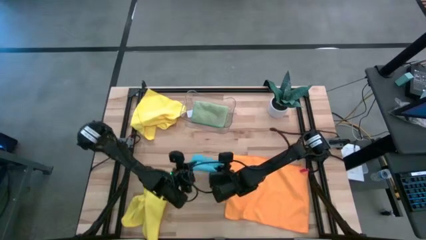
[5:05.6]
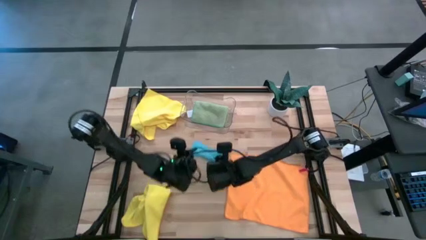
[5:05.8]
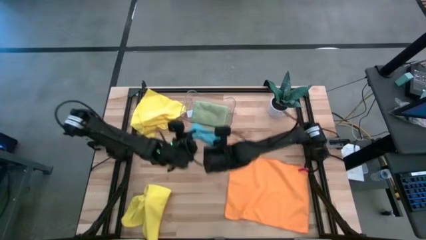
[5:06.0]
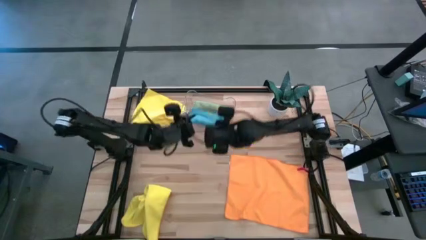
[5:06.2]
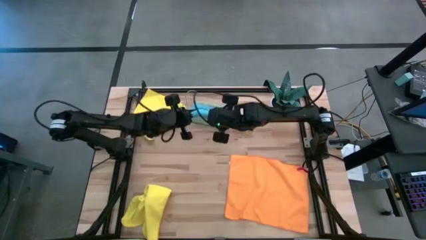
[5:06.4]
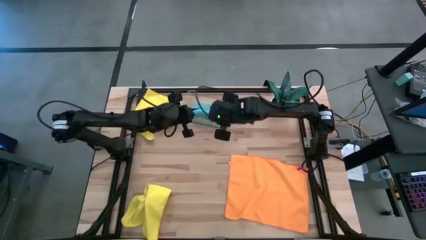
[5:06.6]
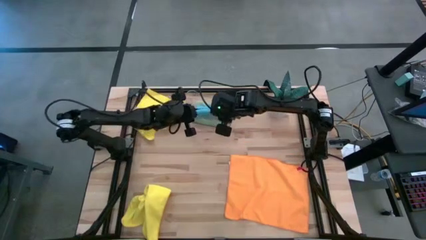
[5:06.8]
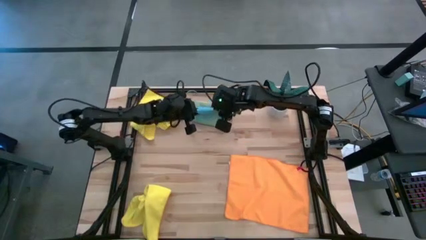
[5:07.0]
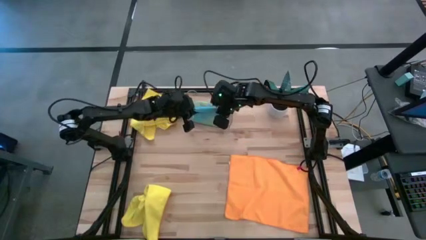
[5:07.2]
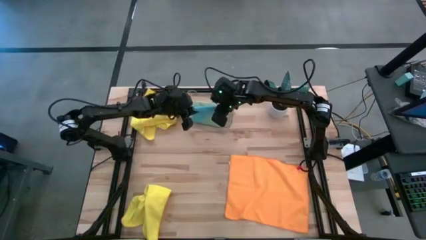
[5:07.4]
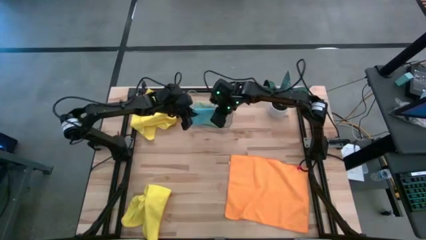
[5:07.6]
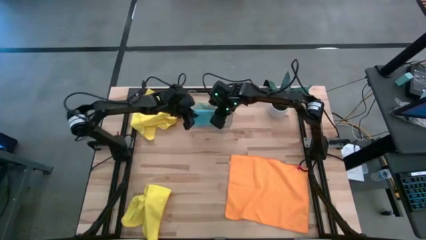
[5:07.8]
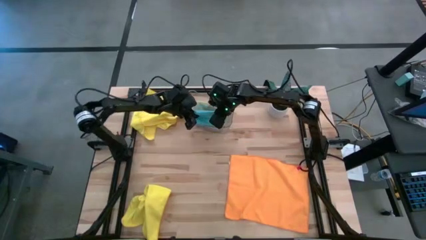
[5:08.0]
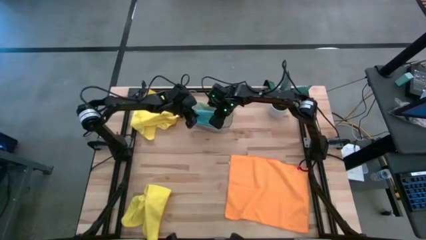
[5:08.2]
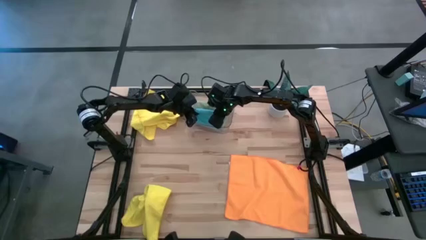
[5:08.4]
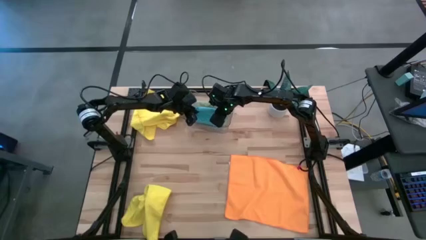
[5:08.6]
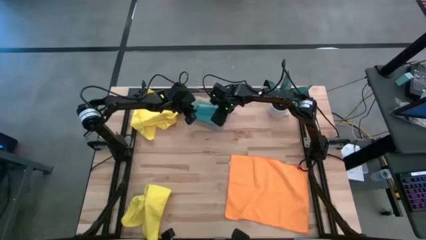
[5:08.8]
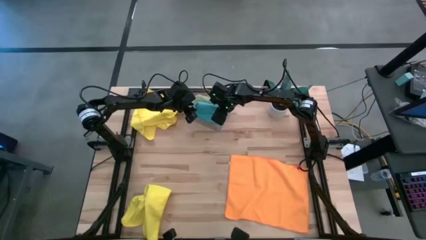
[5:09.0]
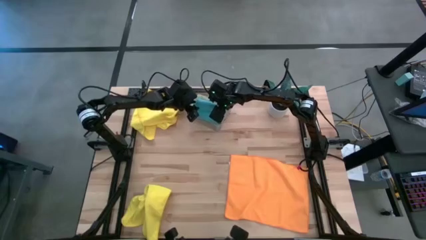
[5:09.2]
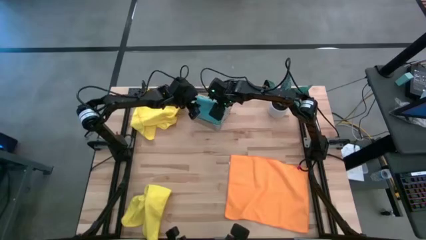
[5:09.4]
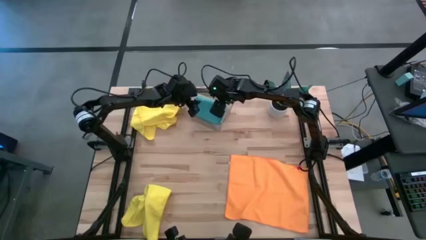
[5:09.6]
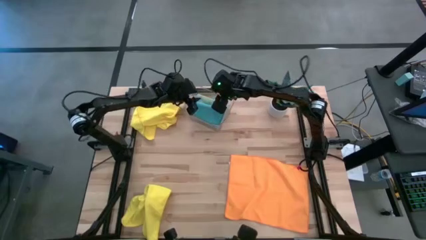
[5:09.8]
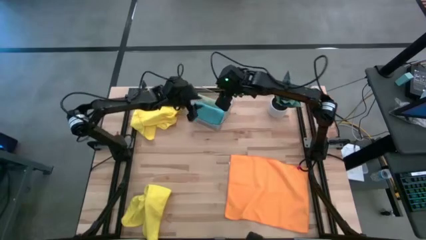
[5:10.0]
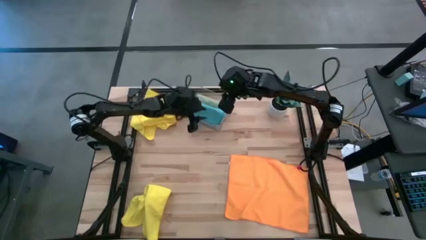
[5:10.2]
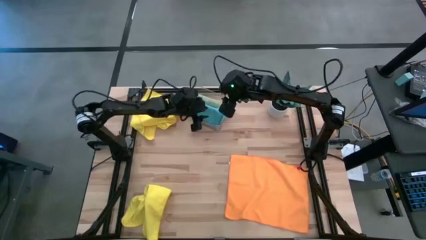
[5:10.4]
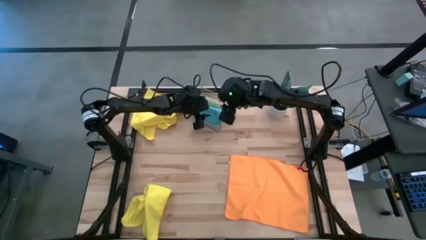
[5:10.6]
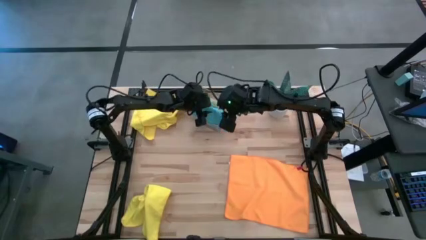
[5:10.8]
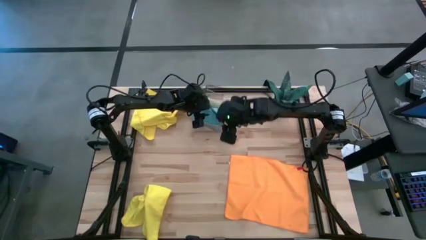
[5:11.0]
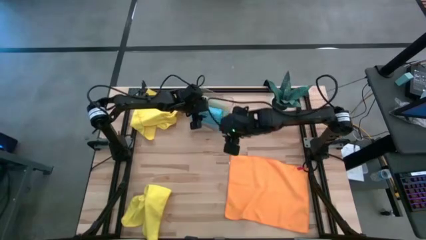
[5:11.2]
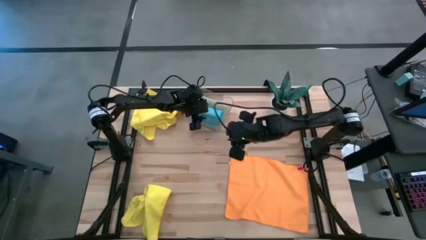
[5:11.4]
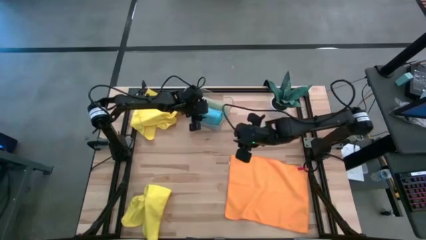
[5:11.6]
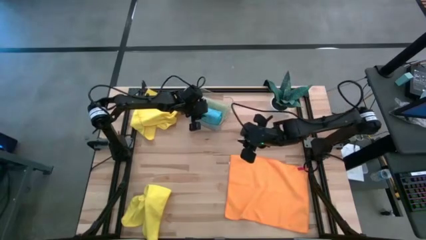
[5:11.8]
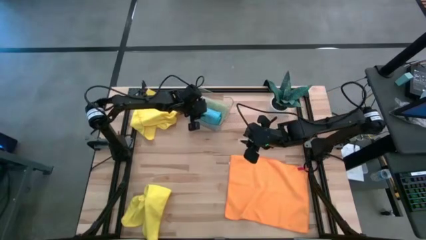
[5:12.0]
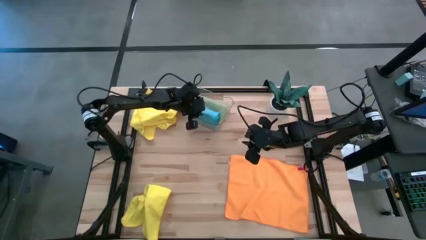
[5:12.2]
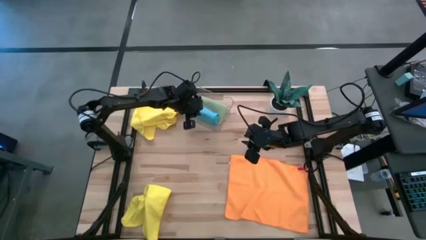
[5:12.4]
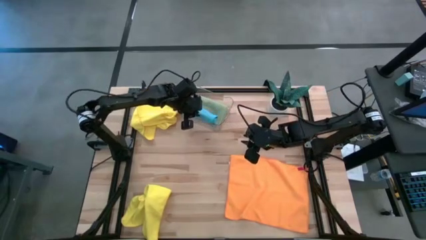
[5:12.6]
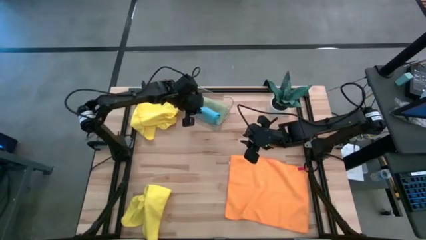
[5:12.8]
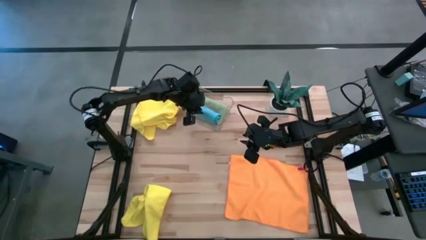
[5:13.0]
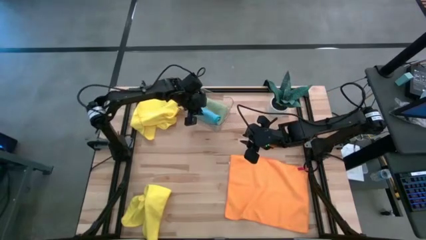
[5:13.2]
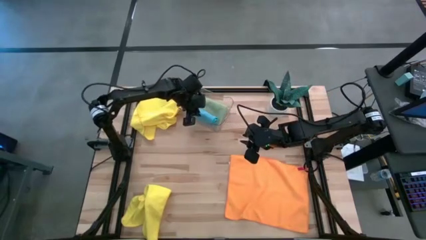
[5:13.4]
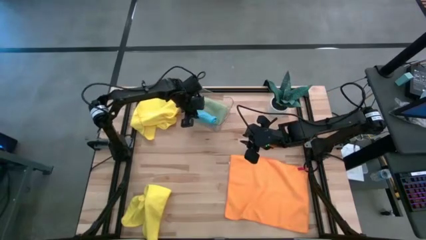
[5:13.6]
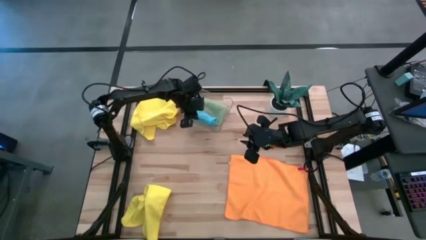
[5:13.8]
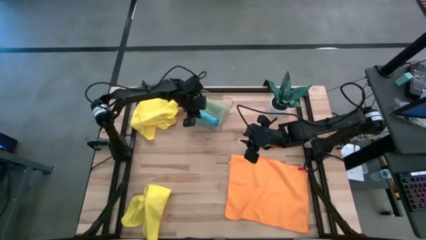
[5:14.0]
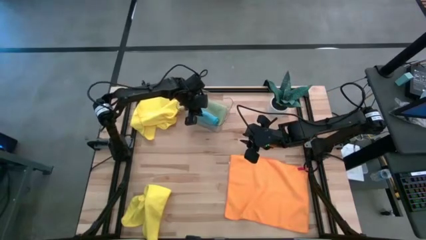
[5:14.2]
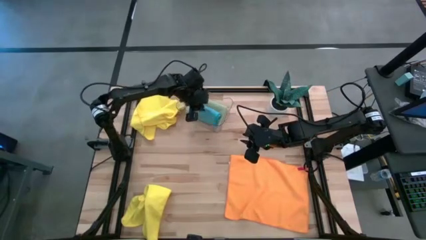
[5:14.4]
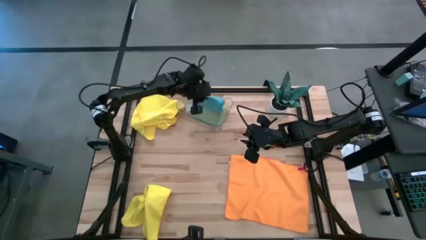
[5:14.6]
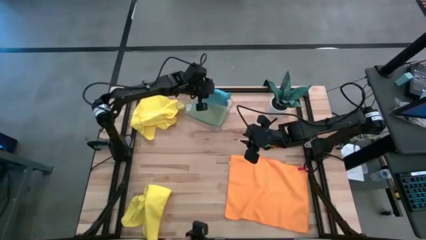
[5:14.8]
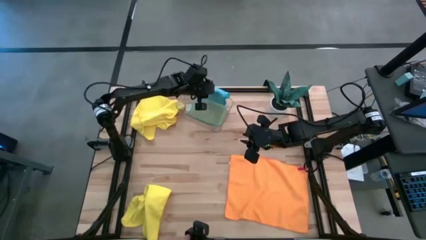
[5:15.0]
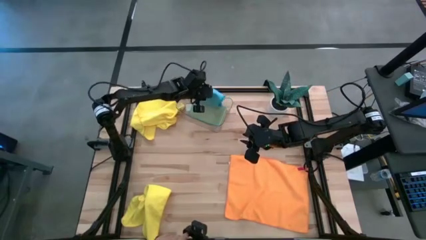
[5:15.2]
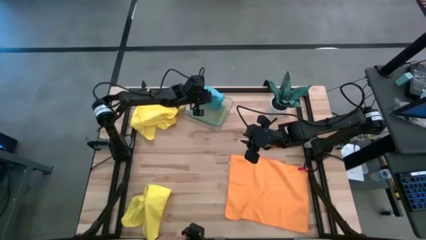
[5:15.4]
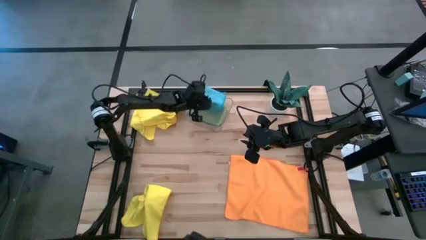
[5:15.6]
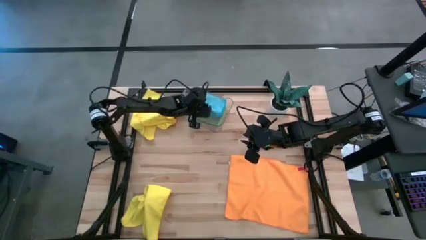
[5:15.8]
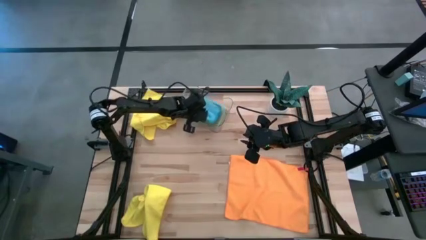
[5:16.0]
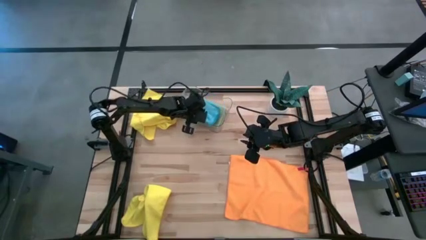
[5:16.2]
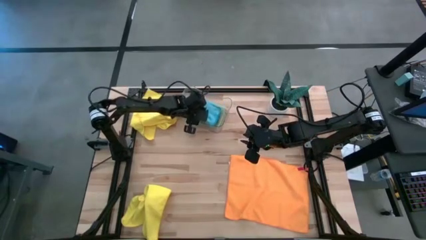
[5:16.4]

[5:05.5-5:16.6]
Task: Fold microfiber towels
Put the blue folded towel into the transparent bin

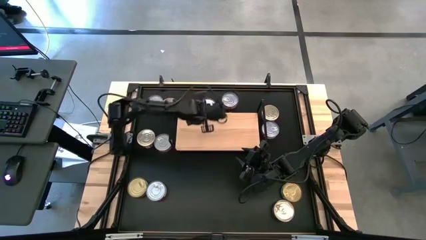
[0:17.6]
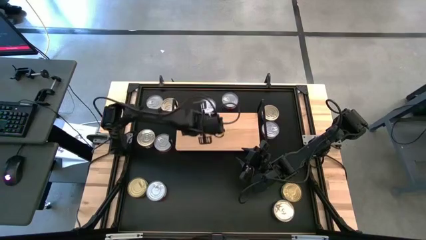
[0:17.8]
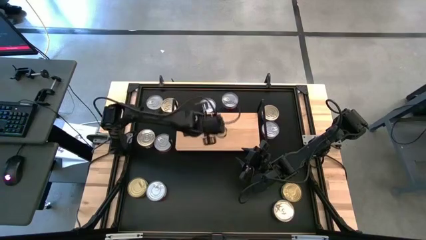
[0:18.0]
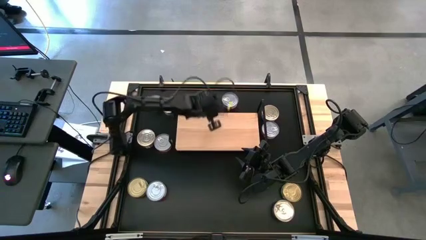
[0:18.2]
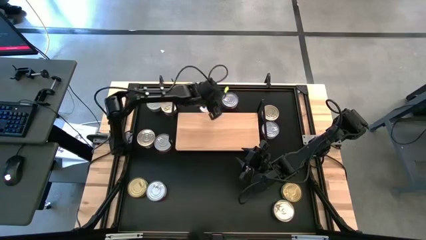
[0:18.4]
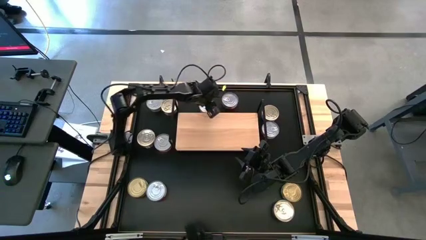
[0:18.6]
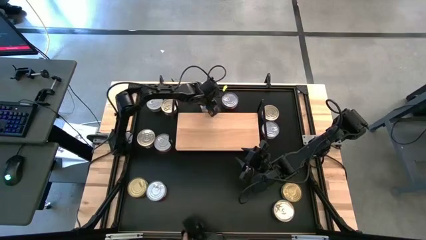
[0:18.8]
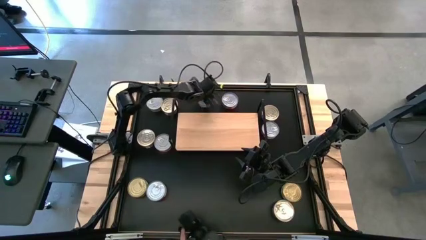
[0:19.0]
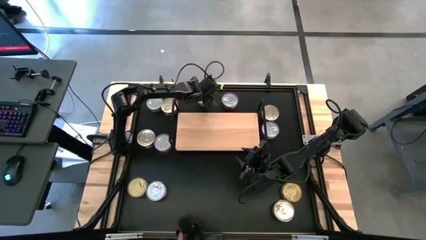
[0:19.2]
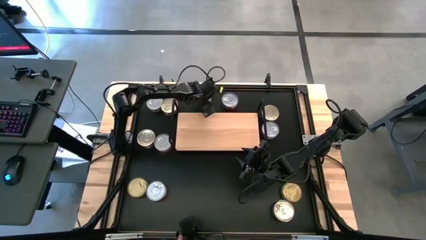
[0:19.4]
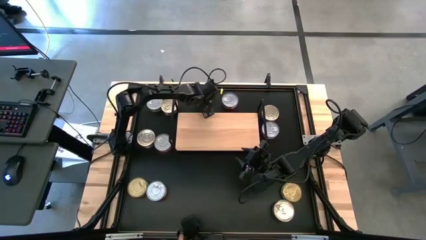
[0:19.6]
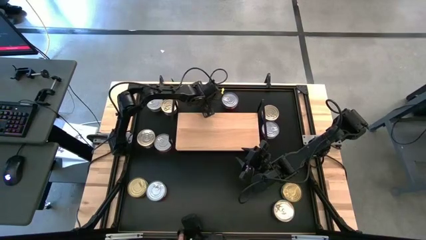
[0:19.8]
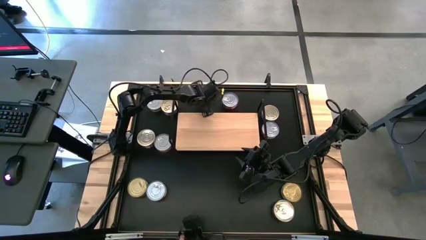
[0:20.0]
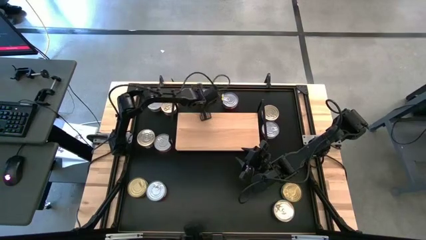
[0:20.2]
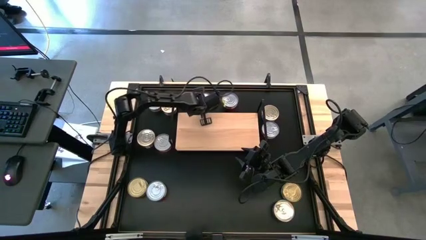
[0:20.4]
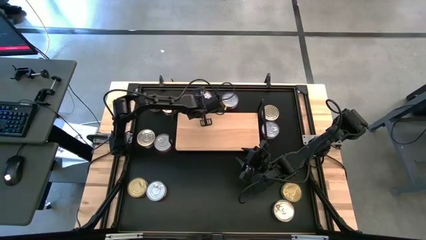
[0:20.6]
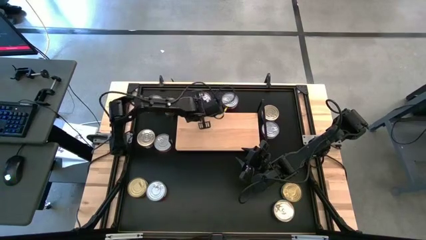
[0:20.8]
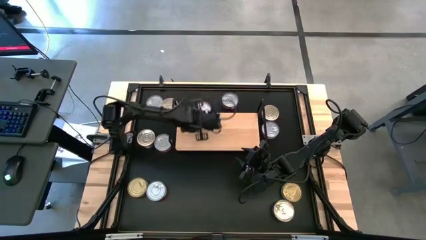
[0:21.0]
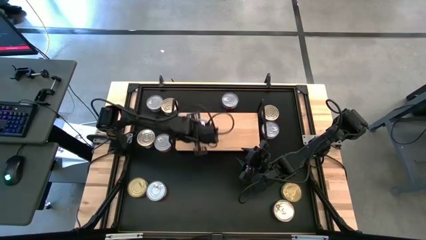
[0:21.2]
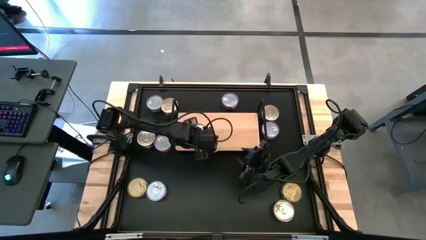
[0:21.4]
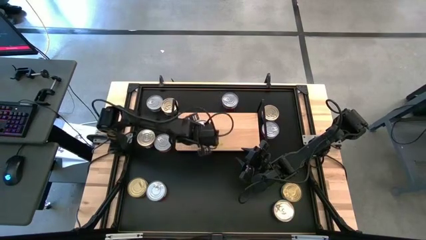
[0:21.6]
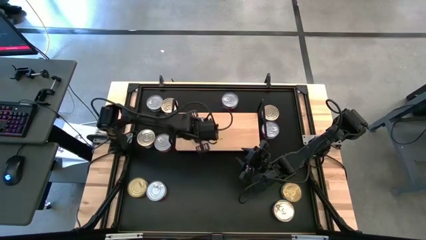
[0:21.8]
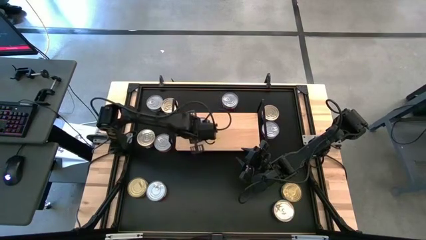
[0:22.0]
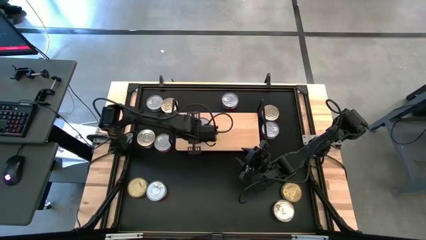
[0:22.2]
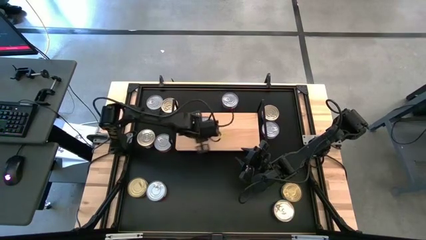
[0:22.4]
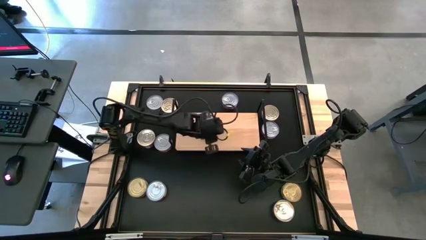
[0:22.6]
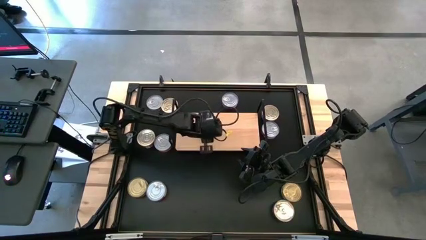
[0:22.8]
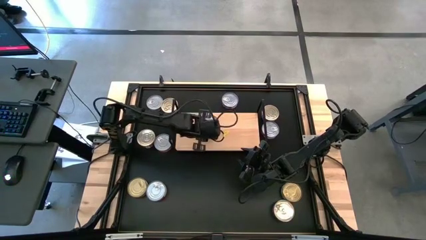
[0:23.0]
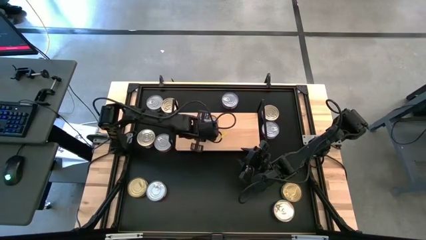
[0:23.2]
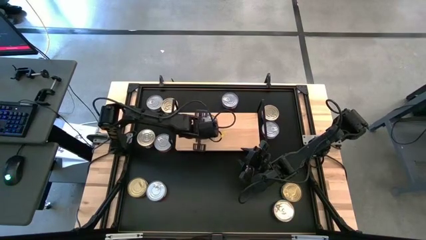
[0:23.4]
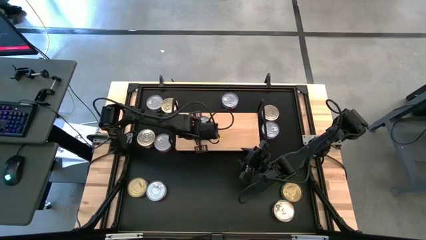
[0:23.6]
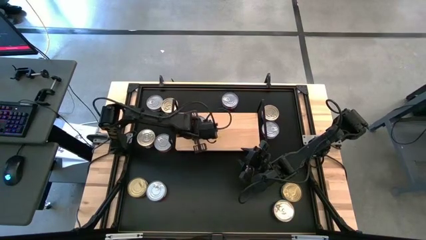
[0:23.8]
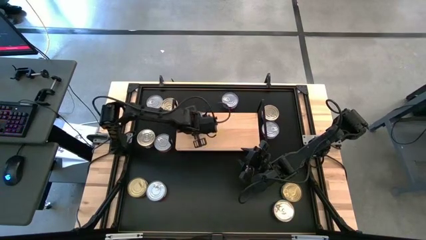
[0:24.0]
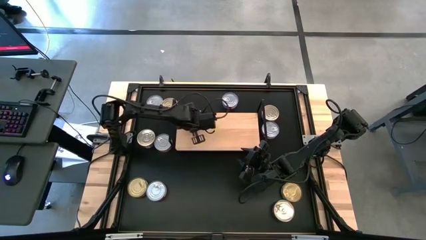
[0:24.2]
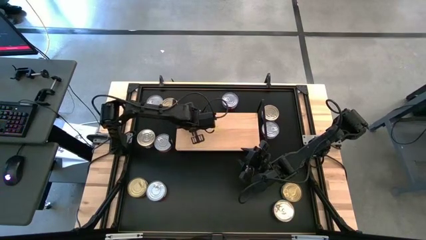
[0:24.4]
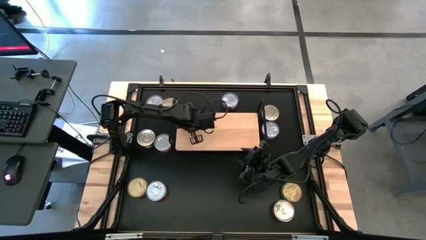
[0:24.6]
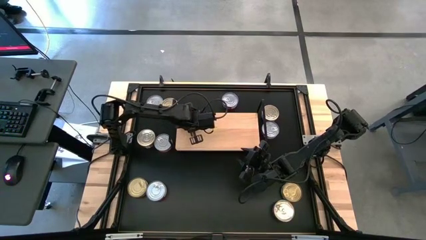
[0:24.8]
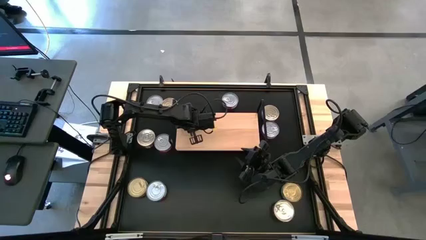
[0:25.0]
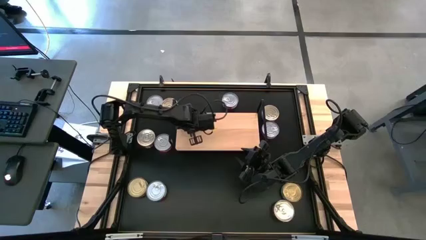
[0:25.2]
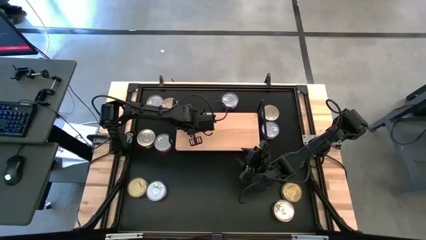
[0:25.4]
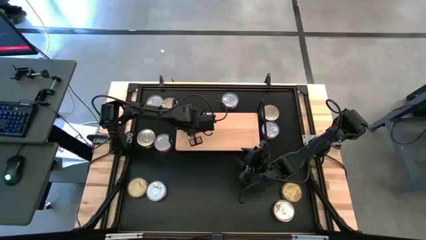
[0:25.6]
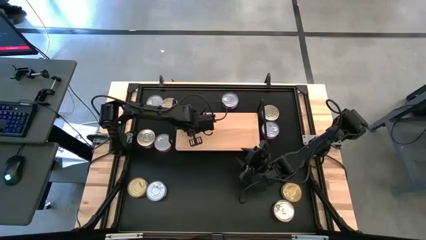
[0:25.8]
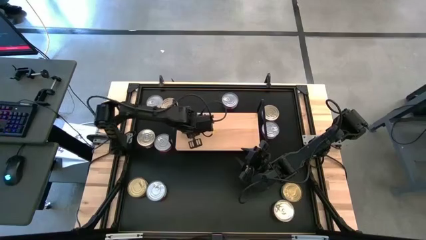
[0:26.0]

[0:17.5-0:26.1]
Task: Stack canned seafood by type on shelf
Put the green tuna can on the shelf
